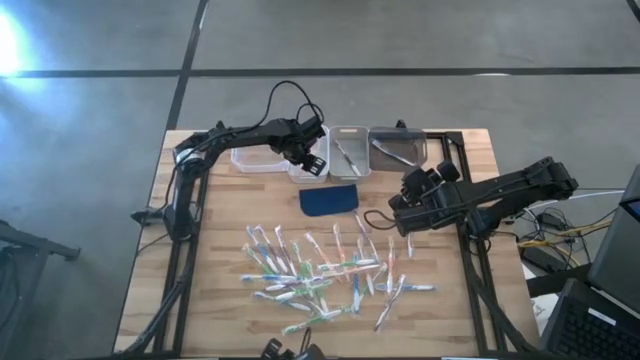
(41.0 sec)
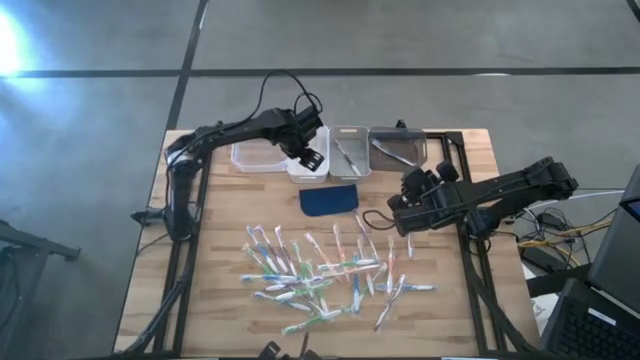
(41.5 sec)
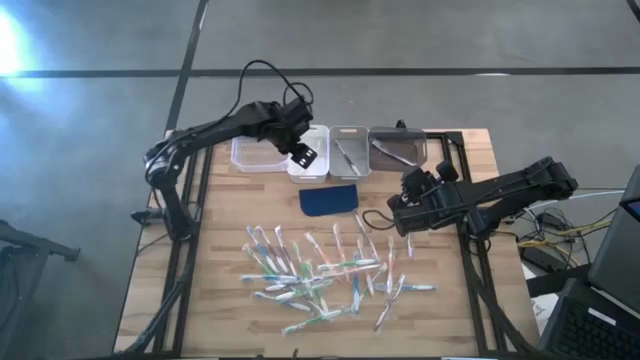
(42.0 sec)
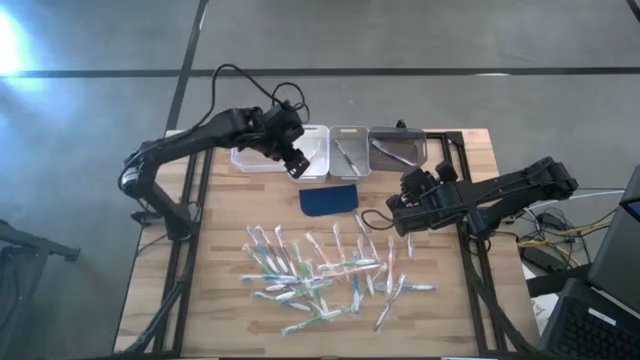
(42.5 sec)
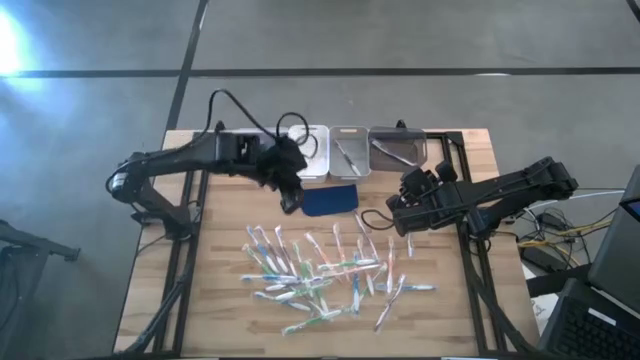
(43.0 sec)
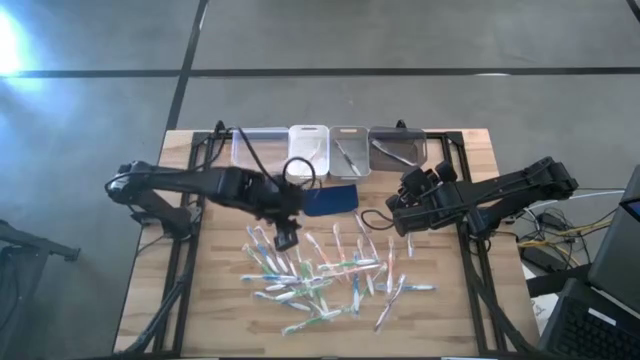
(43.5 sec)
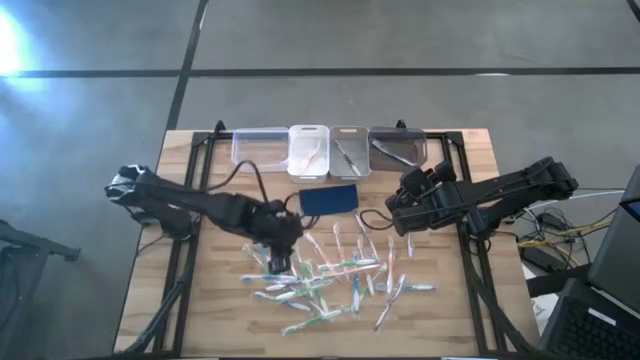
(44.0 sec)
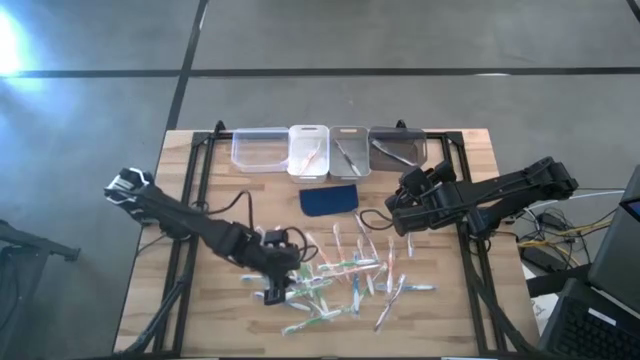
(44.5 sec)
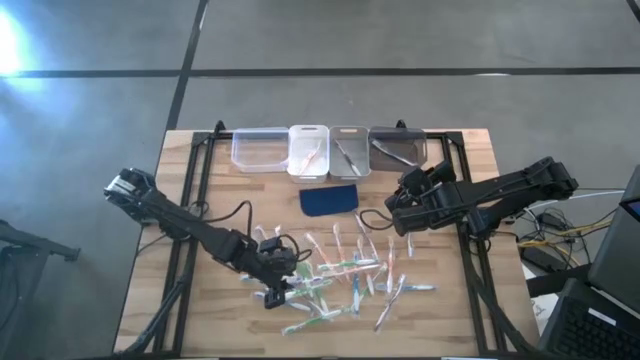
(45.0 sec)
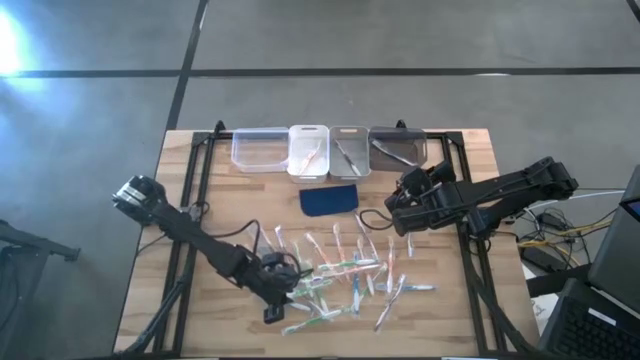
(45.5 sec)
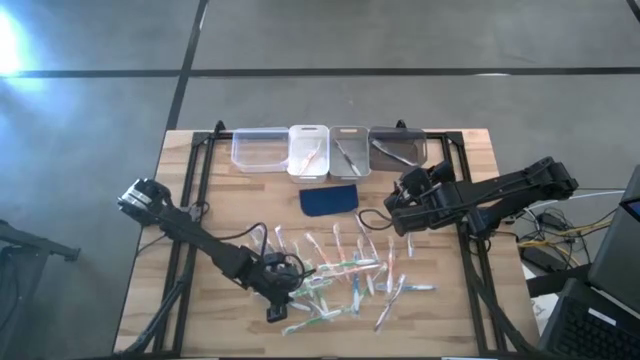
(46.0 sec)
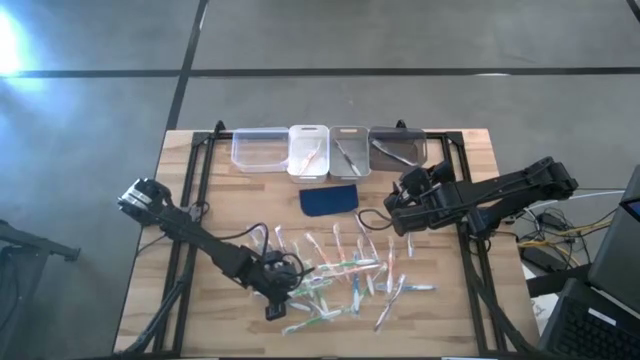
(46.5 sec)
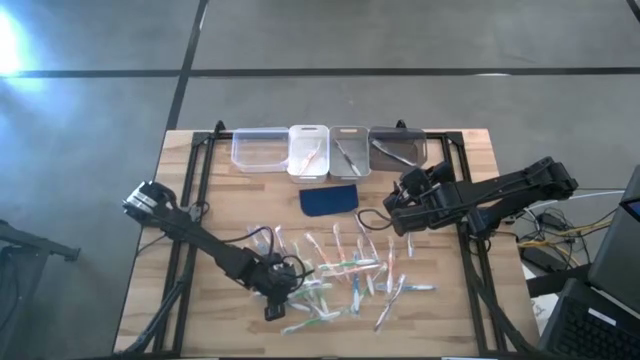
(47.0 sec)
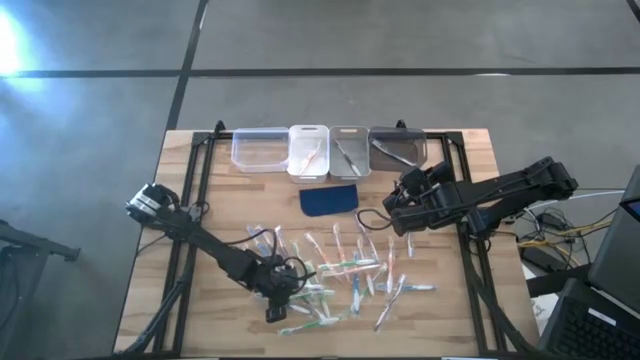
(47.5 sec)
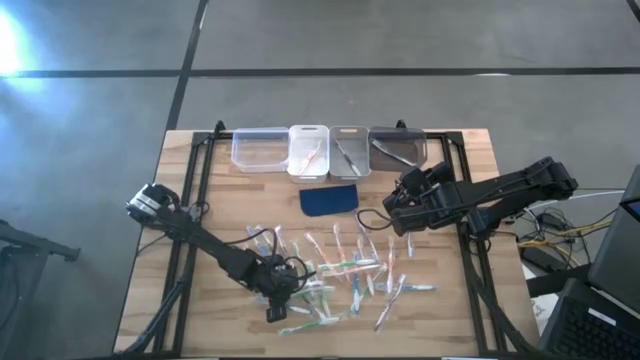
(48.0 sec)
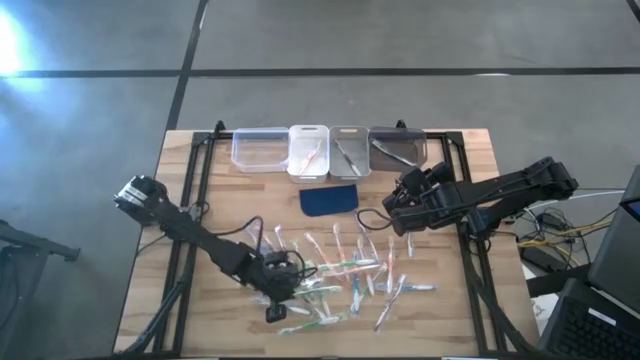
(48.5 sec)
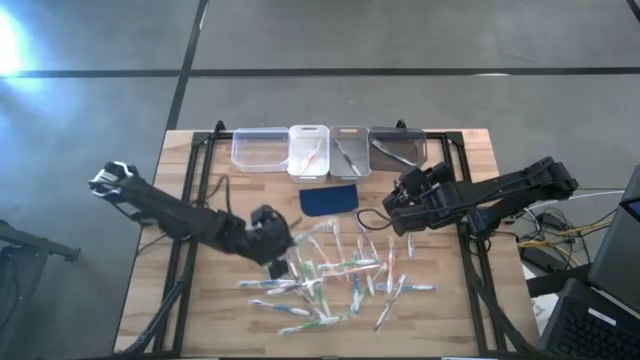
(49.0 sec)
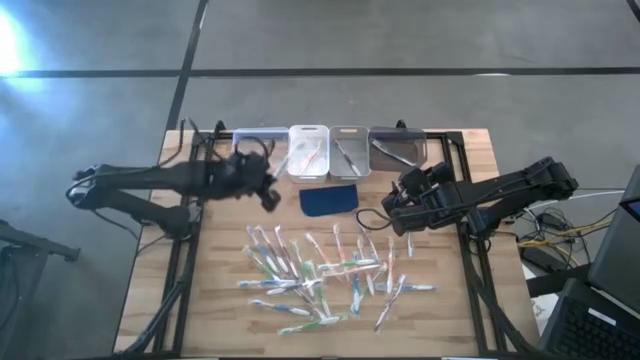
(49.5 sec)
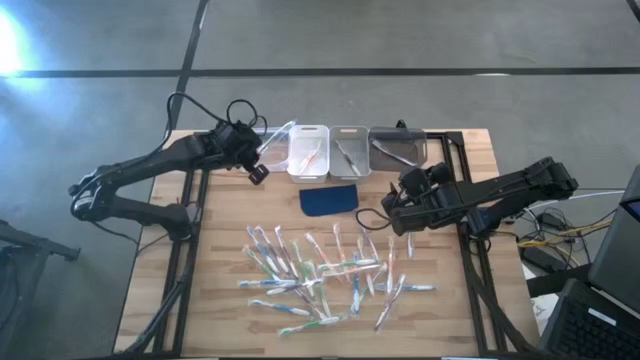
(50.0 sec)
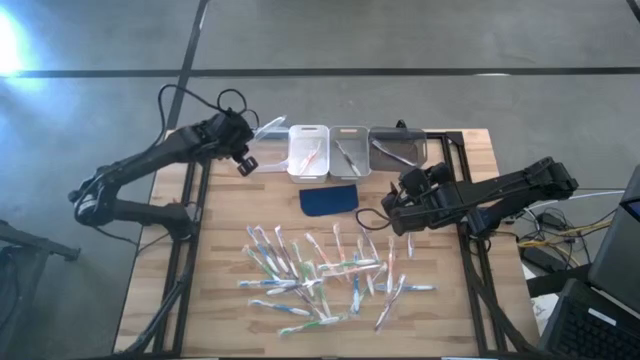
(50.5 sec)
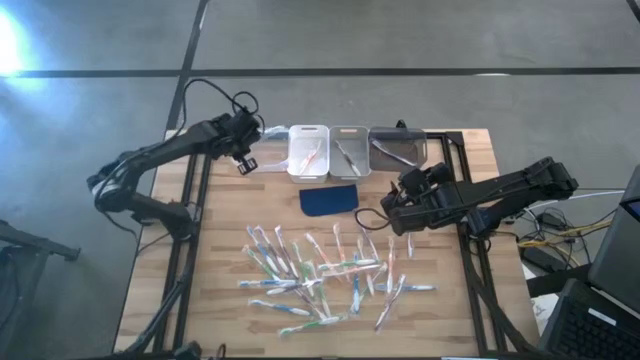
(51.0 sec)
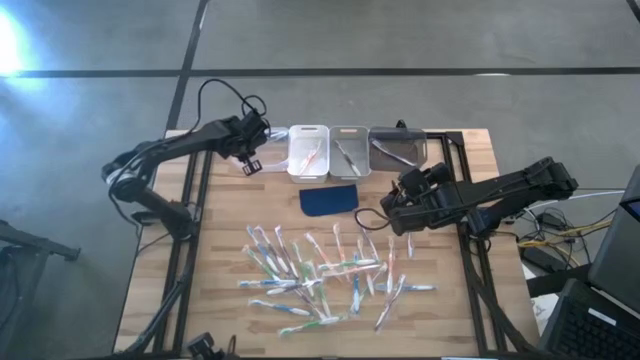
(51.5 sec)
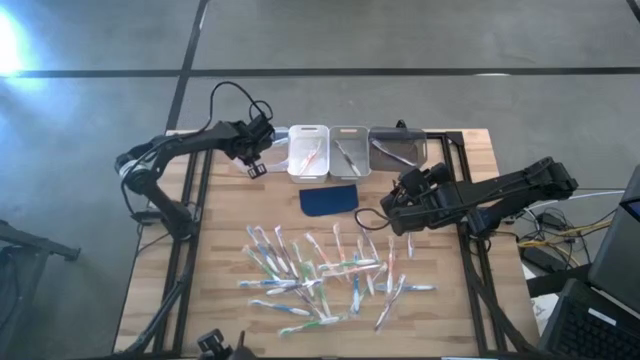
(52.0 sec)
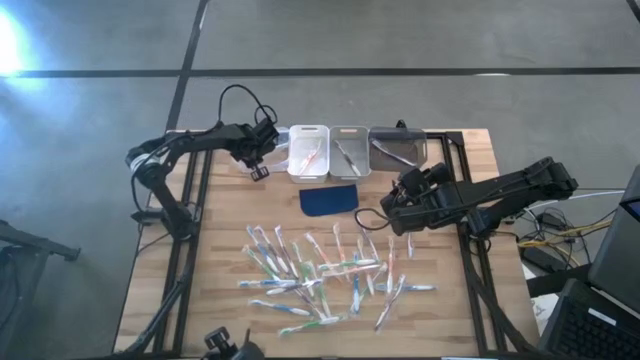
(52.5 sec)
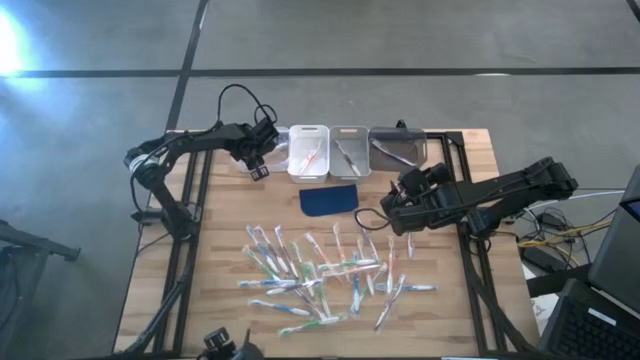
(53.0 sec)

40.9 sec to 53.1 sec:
Task: Pick & Place Toothbrushes
Put the green toothbrush into the transparent bin

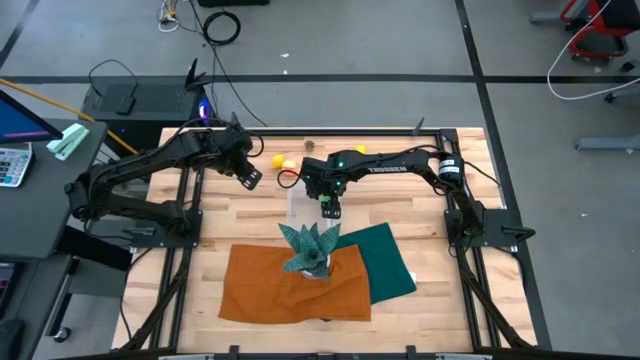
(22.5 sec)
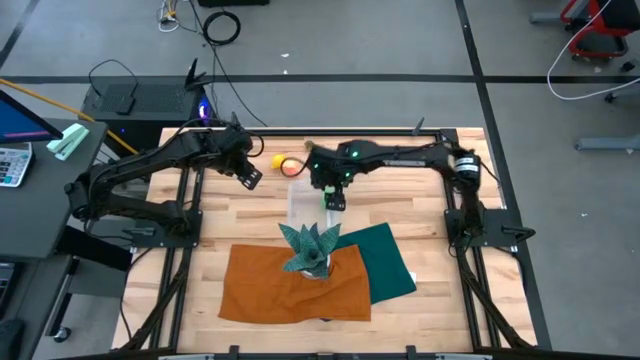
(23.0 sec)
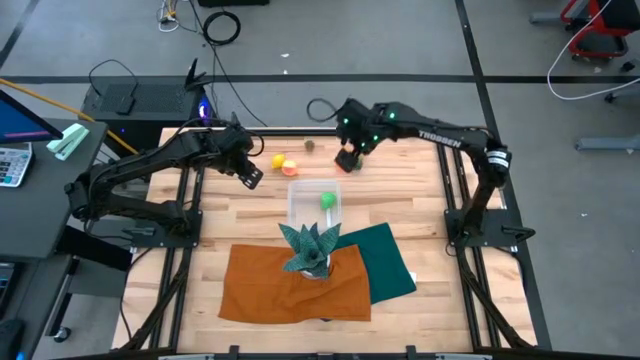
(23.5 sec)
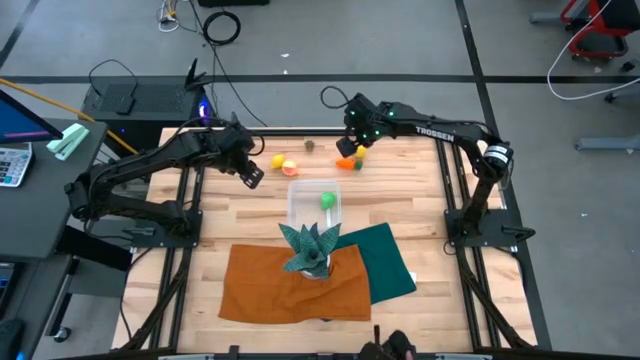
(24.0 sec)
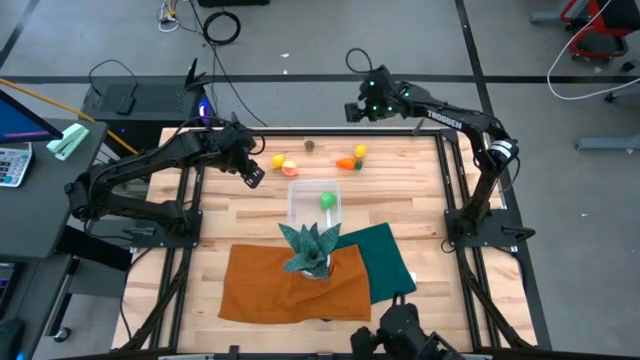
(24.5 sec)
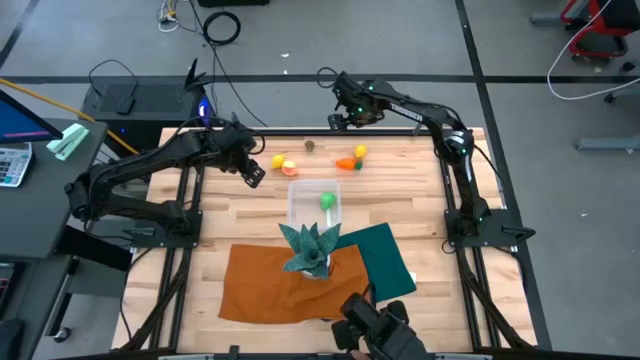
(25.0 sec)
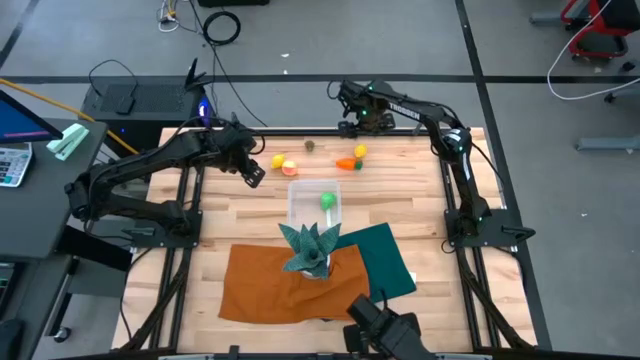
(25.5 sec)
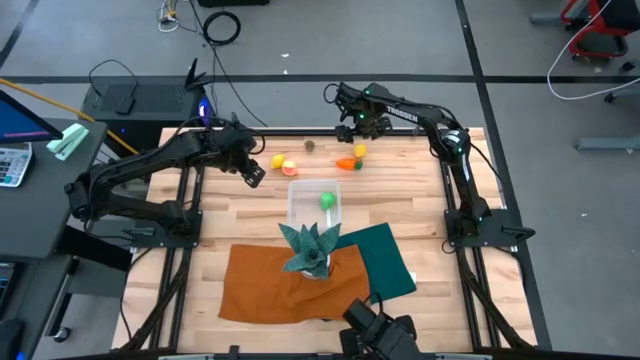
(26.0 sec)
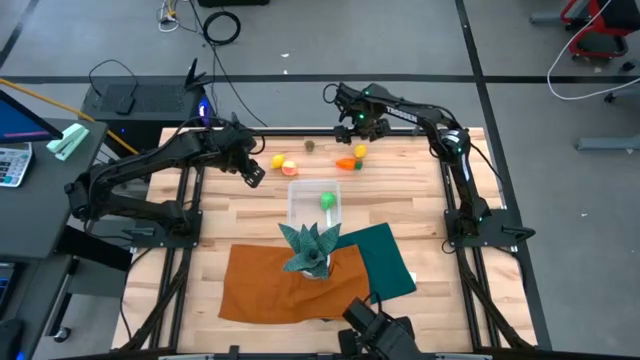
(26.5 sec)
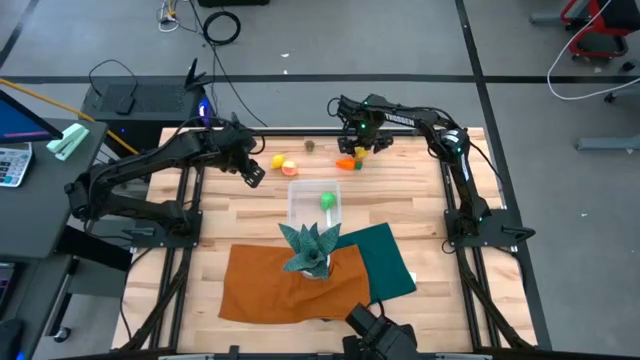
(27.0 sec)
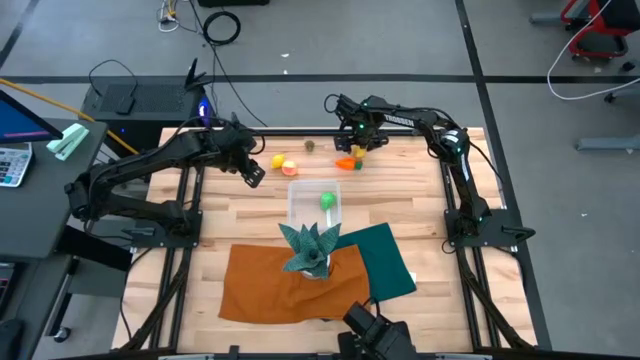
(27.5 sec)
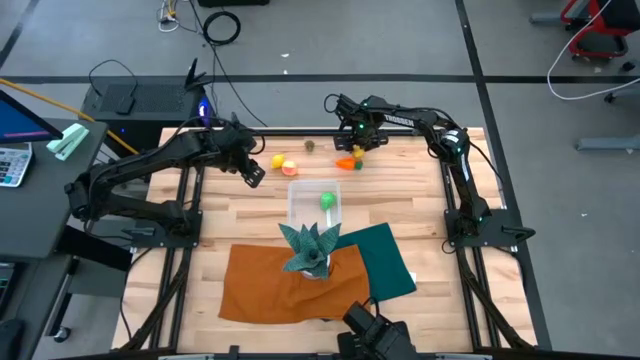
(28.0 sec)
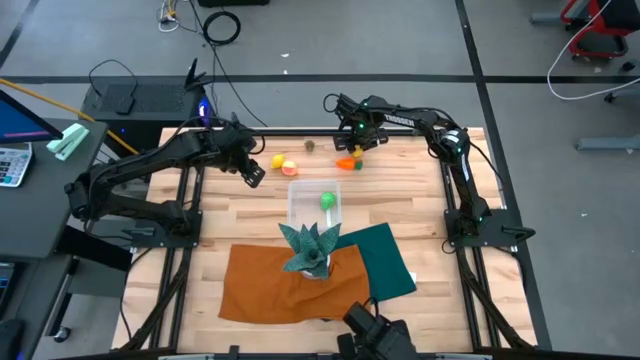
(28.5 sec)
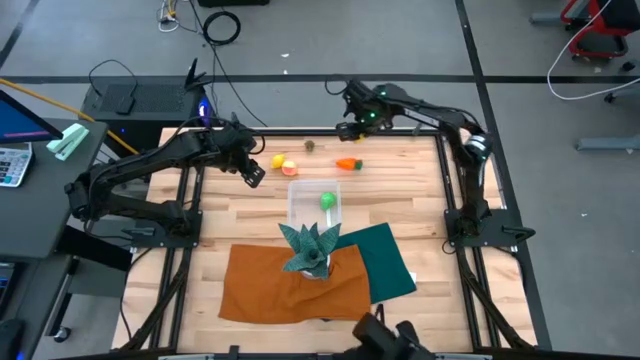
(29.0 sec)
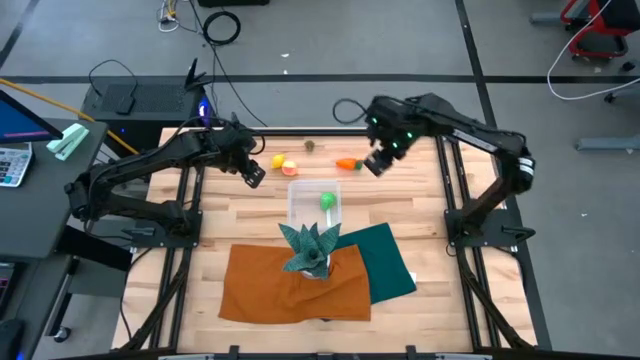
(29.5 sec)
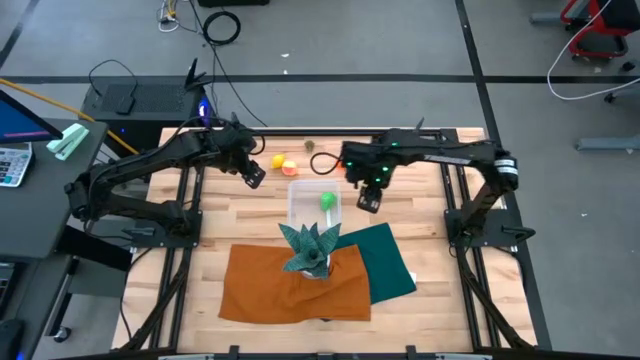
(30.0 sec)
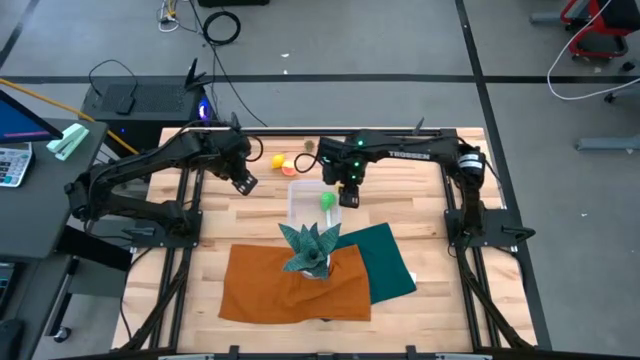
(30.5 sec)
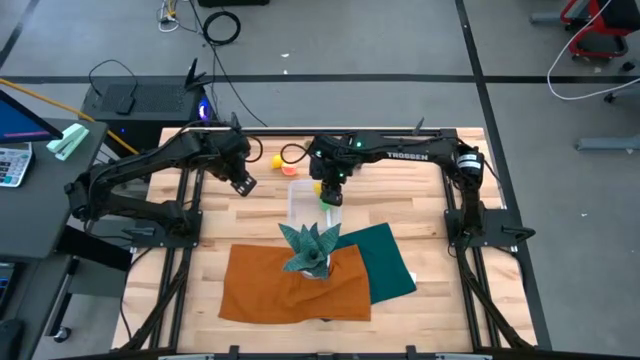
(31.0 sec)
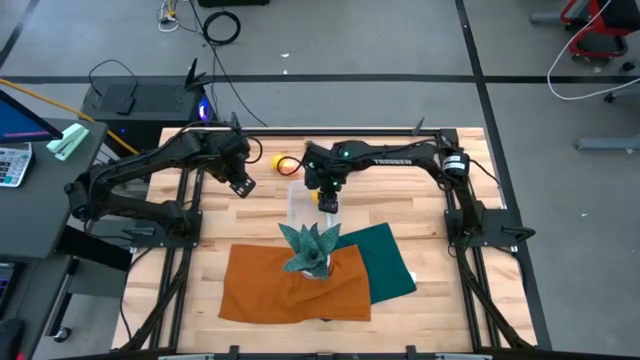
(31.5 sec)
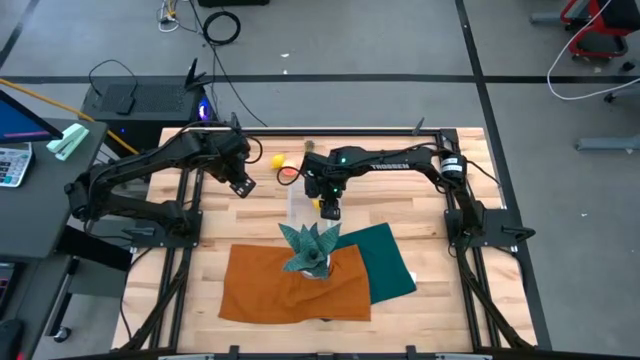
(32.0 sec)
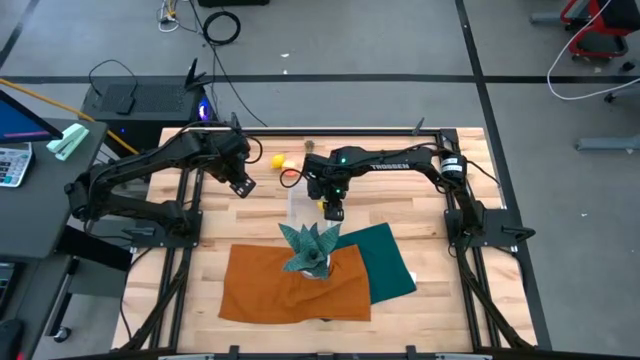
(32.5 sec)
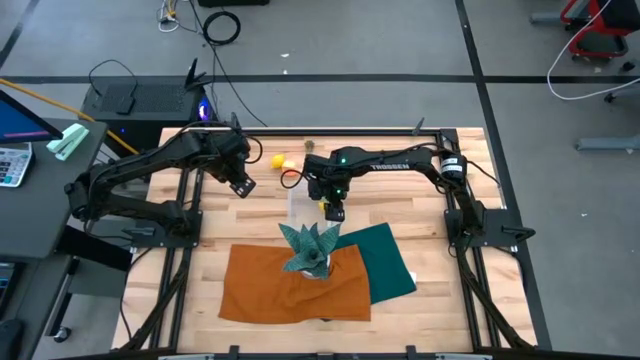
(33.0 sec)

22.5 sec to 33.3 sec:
Task: Pick and placing Produce into tupperware
Put the yellow lemon into the transparent bin
